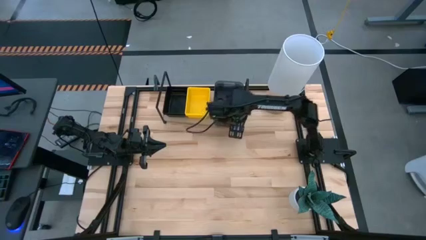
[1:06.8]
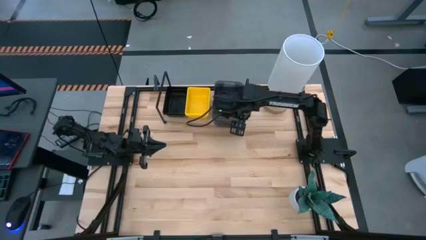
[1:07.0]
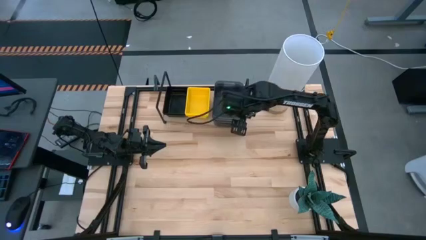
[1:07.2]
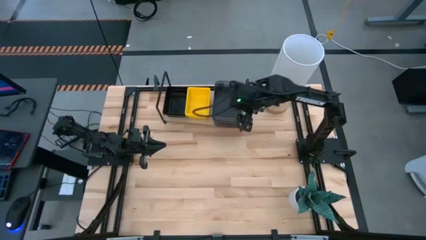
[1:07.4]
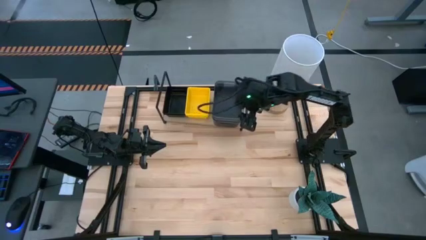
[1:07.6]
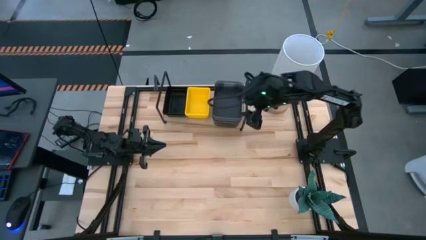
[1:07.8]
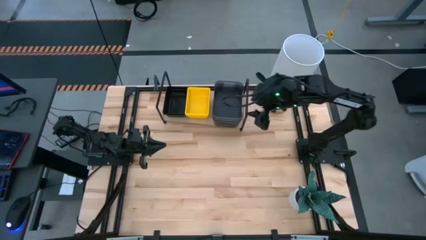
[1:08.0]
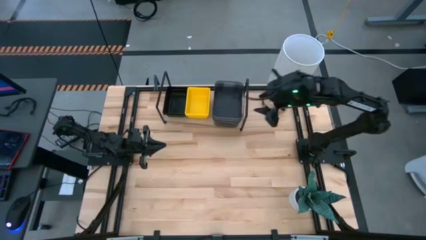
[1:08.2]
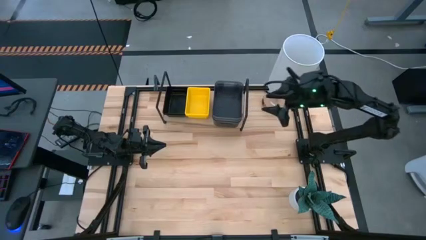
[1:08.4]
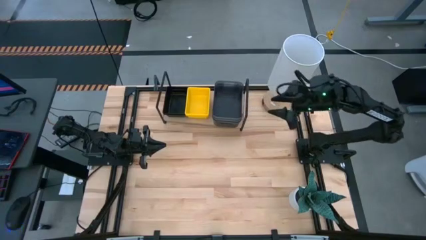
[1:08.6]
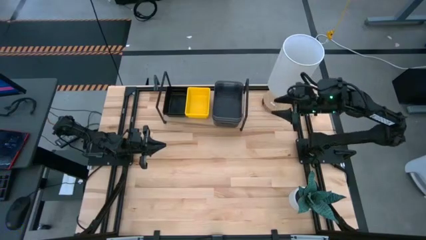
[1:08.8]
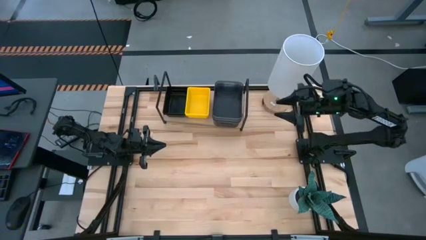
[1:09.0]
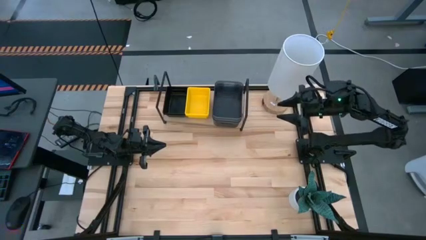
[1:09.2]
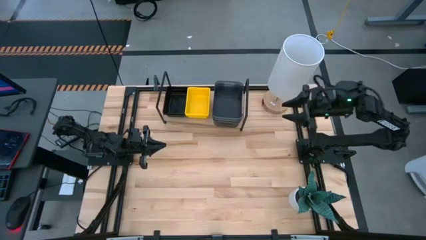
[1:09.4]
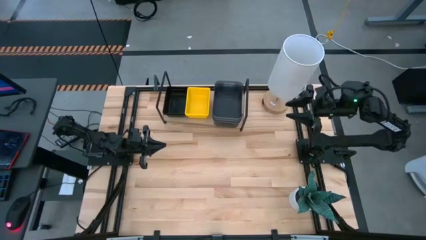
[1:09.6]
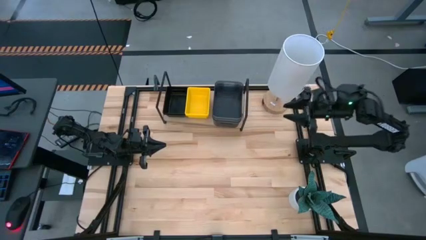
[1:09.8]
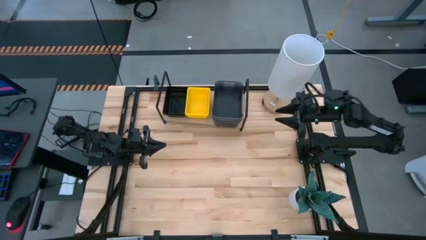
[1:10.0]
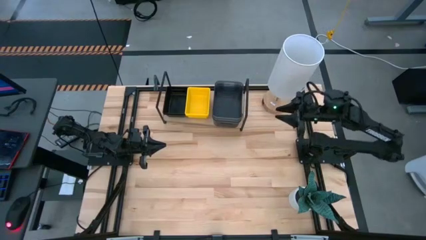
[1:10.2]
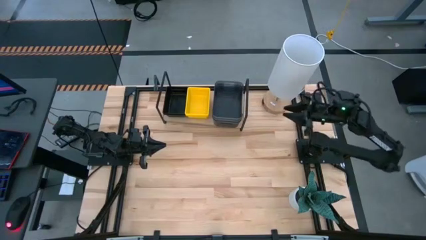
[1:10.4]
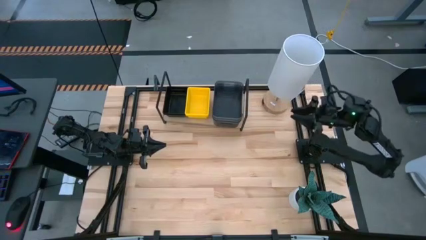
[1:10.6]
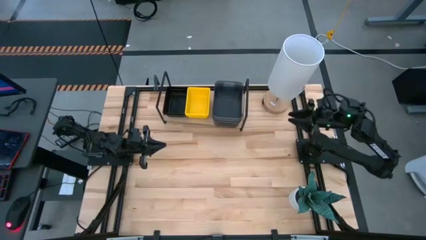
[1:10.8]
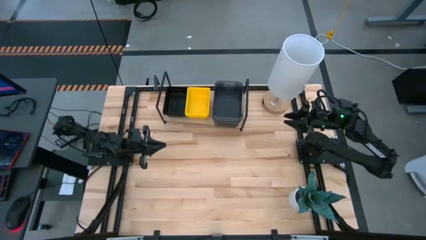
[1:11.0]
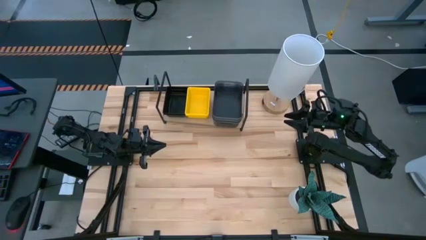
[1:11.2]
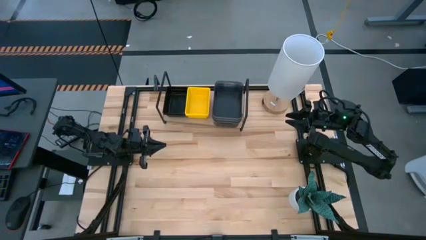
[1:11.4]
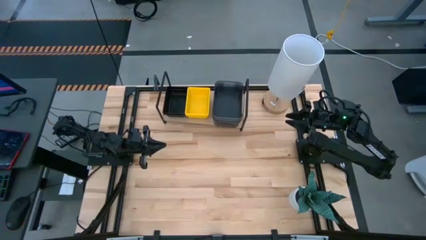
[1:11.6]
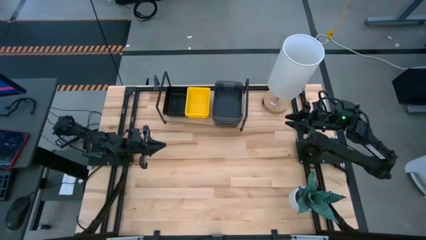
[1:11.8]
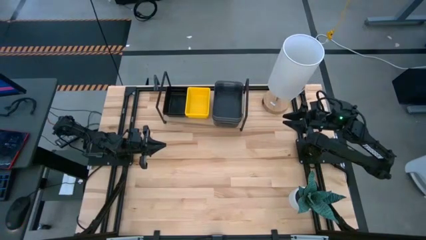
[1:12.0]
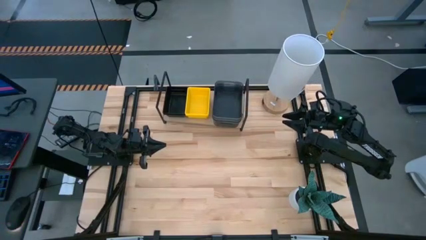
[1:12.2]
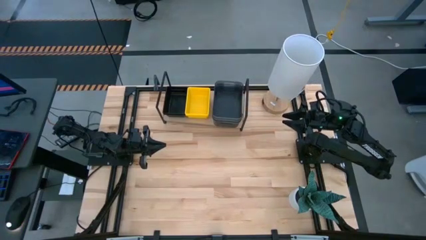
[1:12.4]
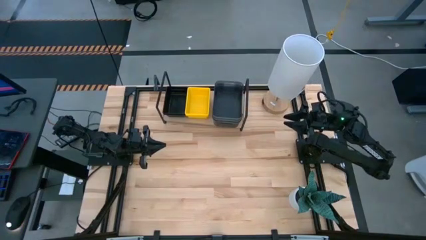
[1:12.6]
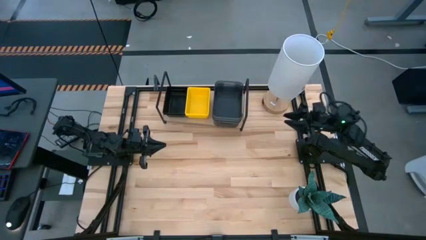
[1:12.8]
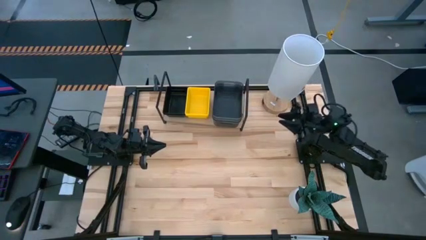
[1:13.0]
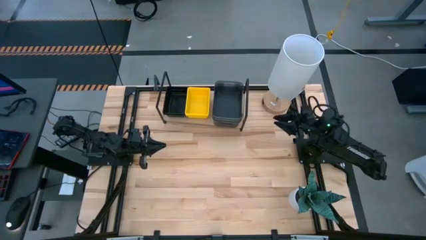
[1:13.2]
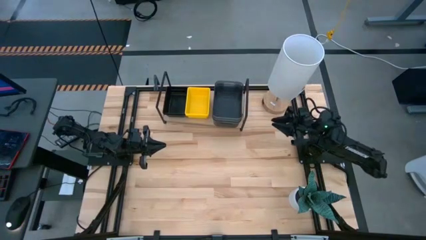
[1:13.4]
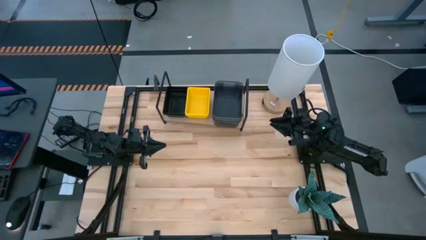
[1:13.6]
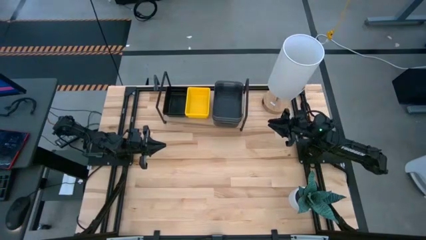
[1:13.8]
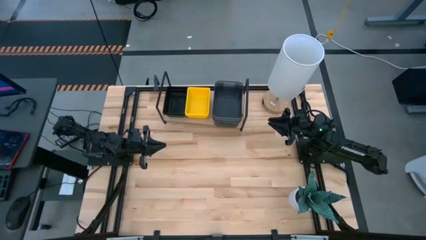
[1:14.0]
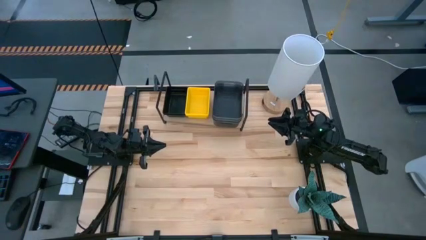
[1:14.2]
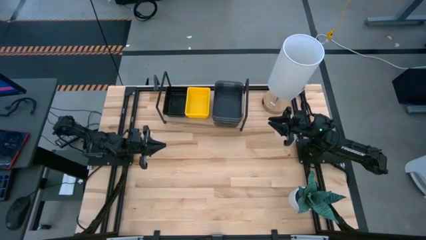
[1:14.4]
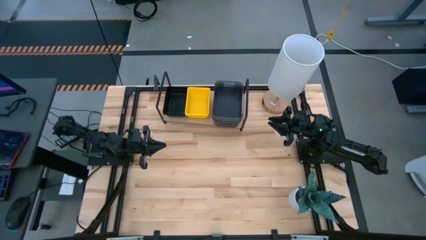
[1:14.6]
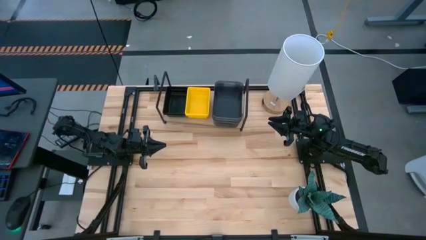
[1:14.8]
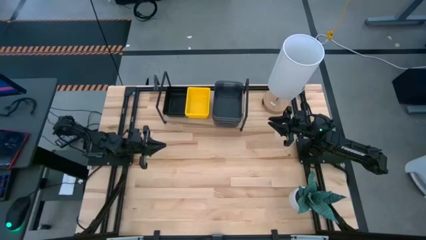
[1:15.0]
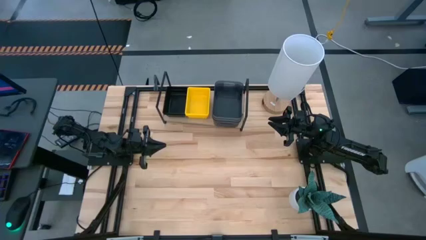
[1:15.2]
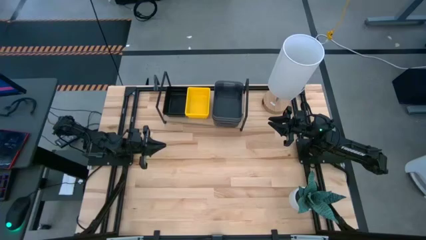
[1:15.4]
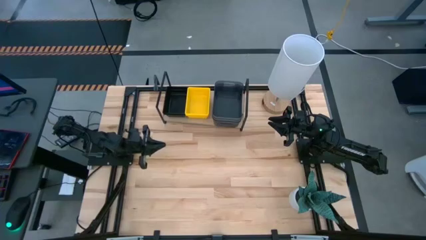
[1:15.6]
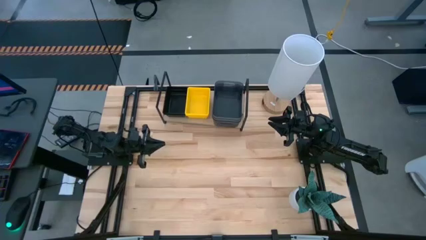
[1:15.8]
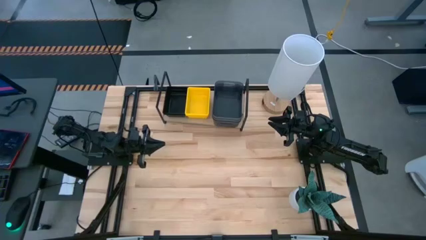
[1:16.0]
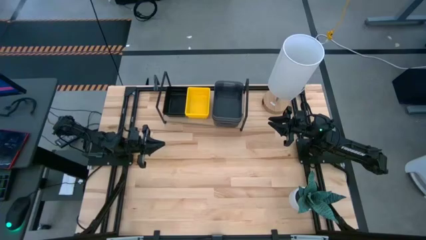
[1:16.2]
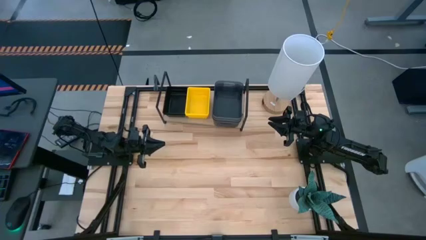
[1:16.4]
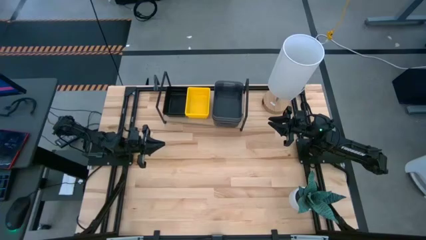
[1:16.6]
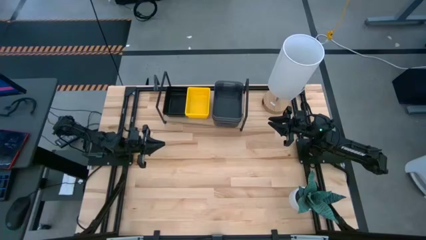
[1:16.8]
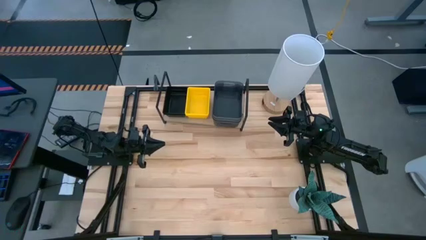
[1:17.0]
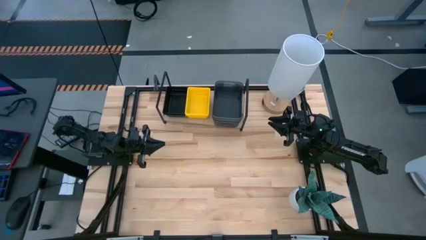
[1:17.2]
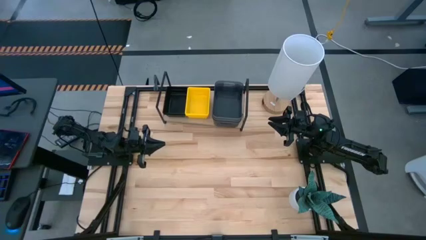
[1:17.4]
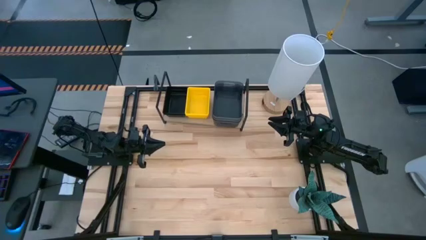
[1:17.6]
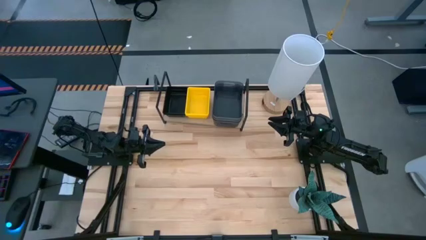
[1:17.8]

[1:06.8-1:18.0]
Task: Stack baskets on shelf by color
Return to Home Position

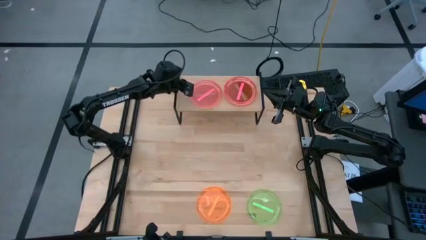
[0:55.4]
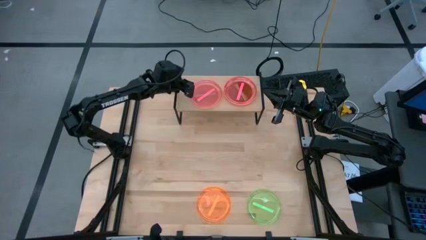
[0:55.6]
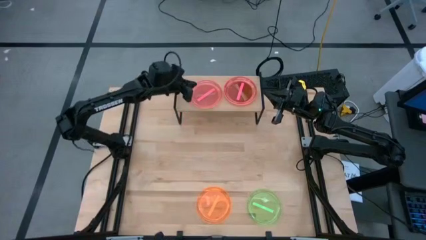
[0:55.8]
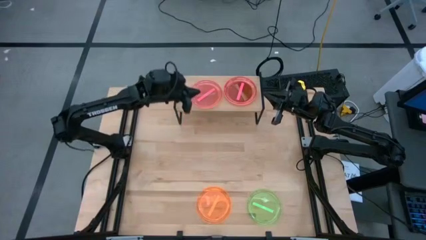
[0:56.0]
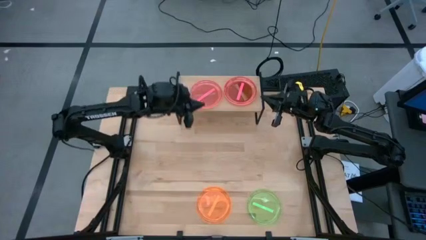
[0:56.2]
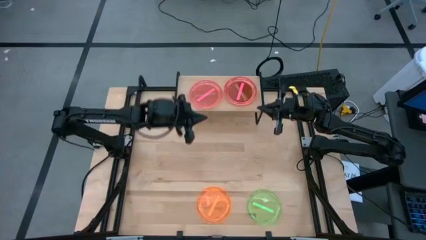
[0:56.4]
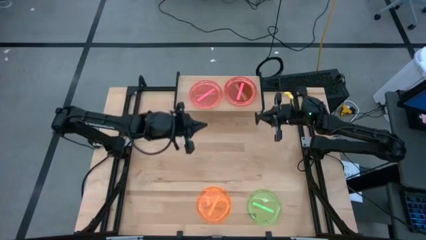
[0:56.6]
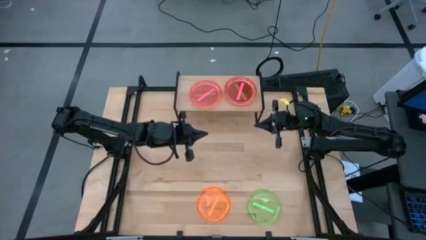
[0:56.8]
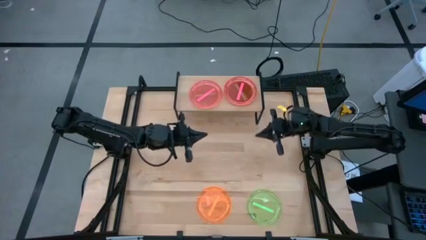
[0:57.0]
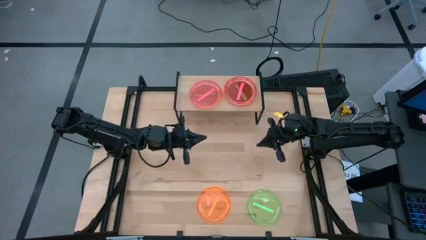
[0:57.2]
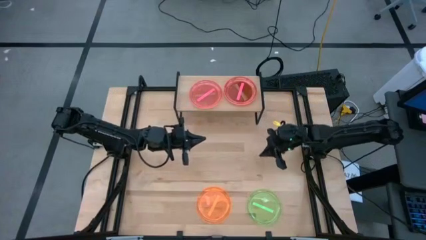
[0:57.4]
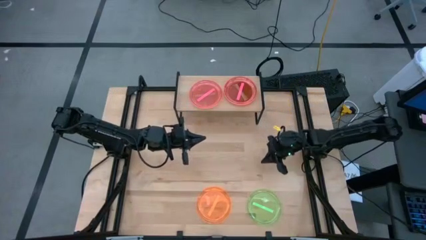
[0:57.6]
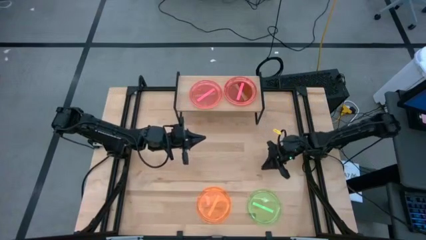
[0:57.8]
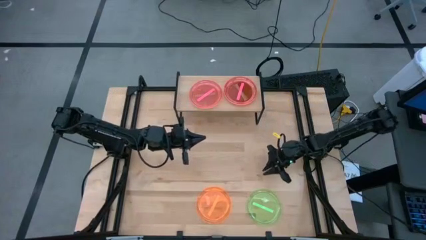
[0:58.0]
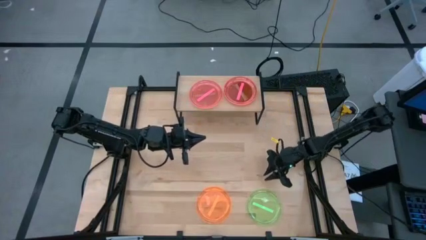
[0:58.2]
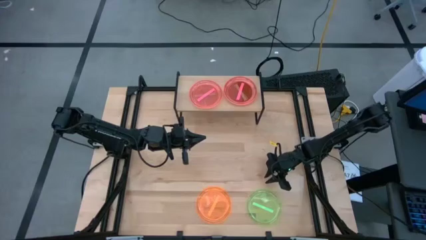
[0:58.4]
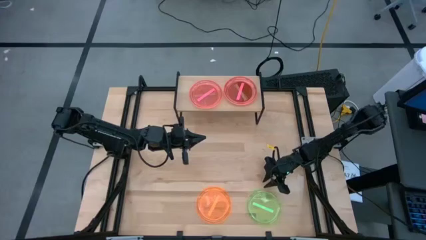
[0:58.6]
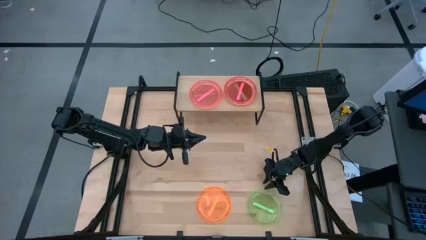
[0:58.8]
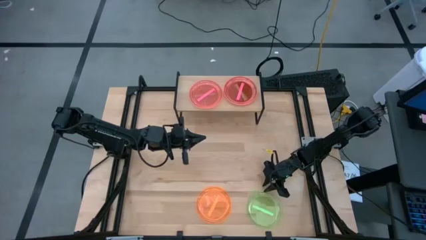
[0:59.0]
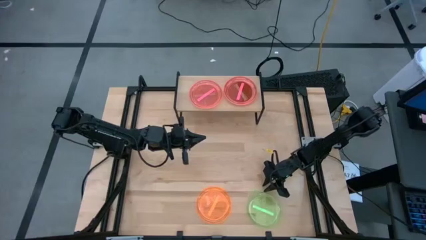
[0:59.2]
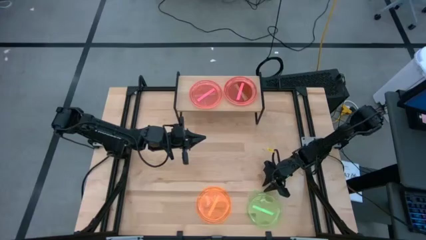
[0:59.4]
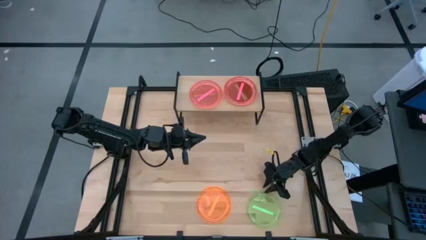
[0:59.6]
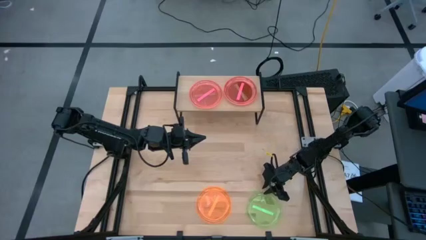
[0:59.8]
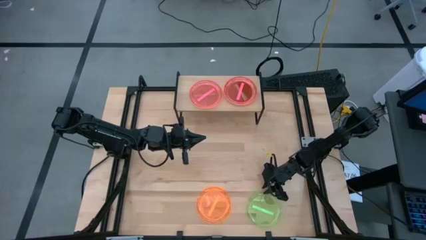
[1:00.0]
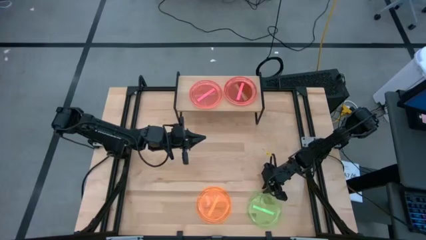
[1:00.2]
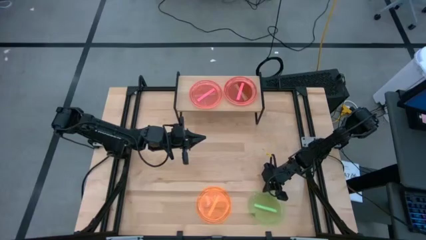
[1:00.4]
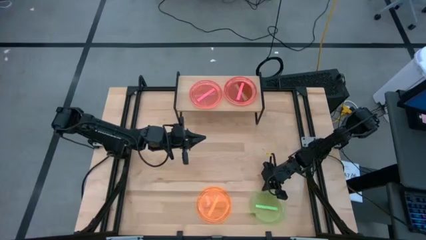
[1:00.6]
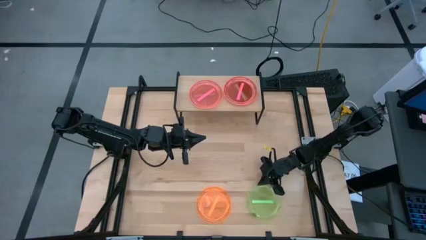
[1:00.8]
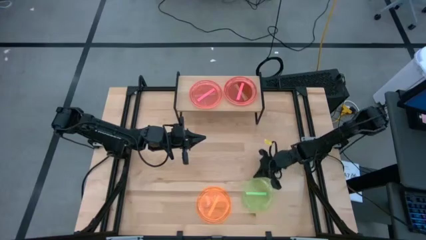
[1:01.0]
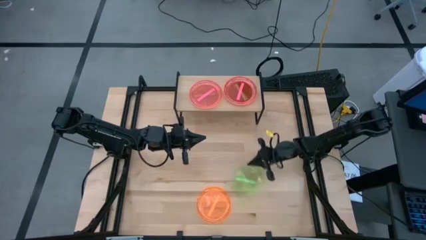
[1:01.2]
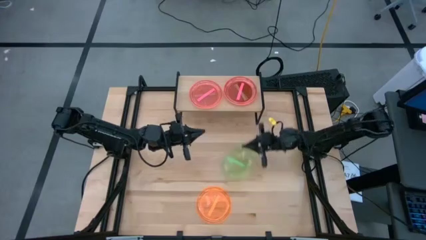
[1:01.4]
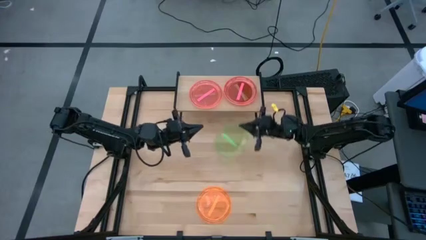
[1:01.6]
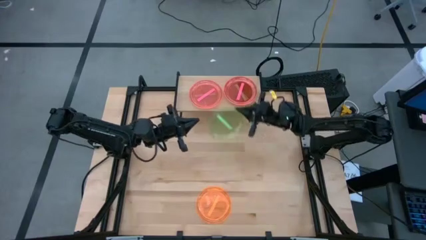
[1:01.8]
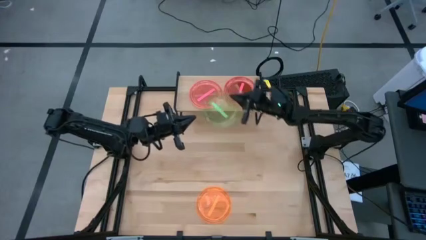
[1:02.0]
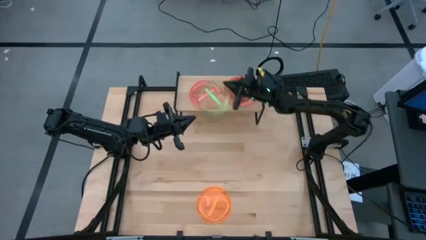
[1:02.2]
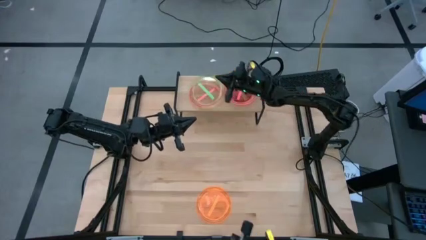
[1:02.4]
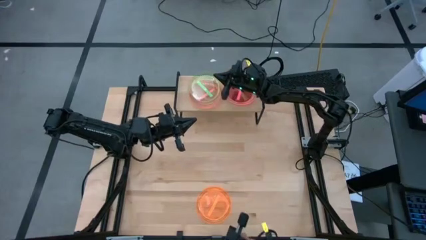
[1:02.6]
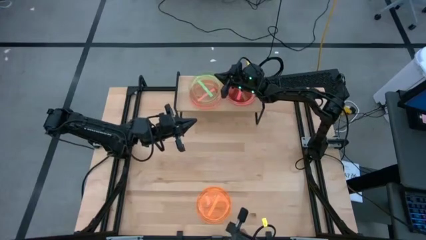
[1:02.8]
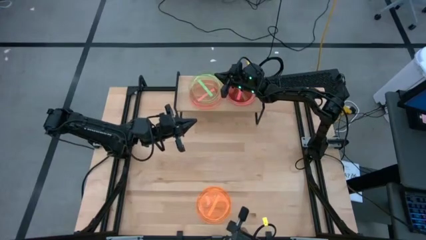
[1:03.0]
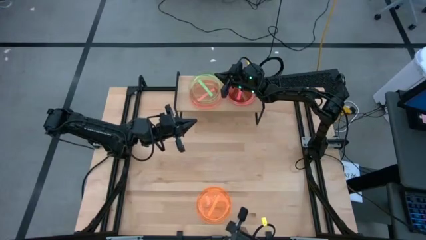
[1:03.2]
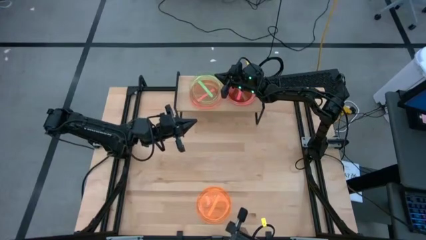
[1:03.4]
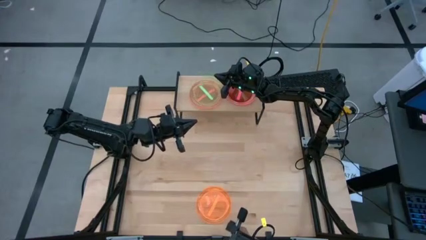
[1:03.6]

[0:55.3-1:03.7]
Task: Place and stack plates onto a shelf
Stack the green plate on top of the left red plate on the shelf
